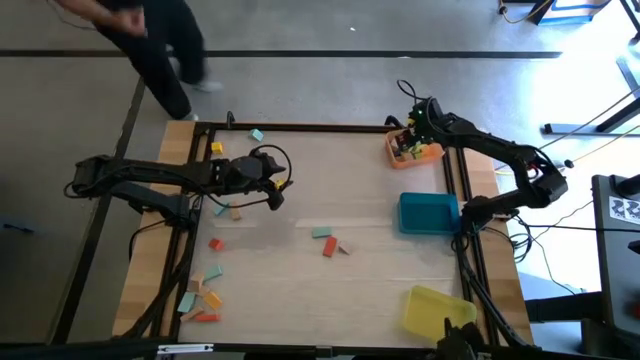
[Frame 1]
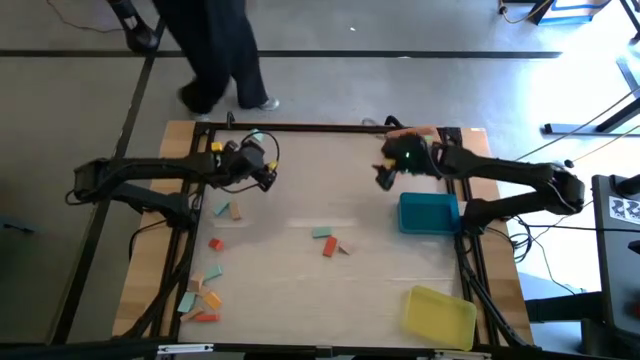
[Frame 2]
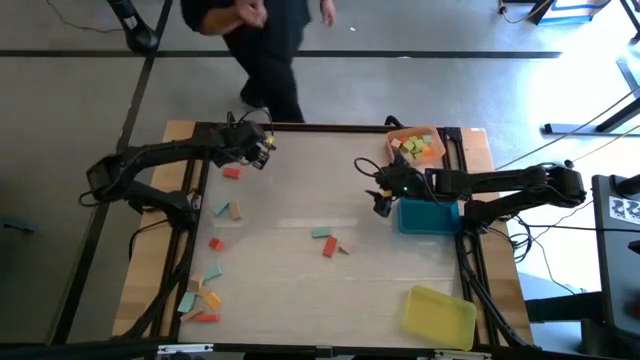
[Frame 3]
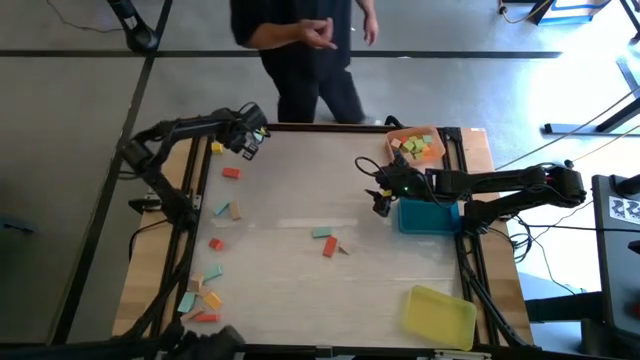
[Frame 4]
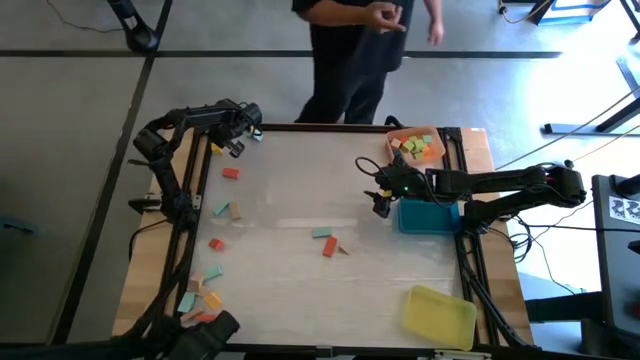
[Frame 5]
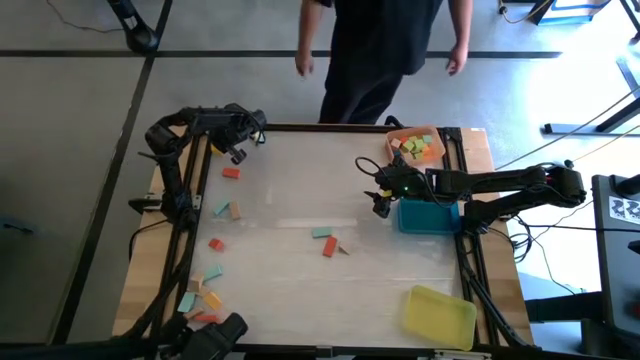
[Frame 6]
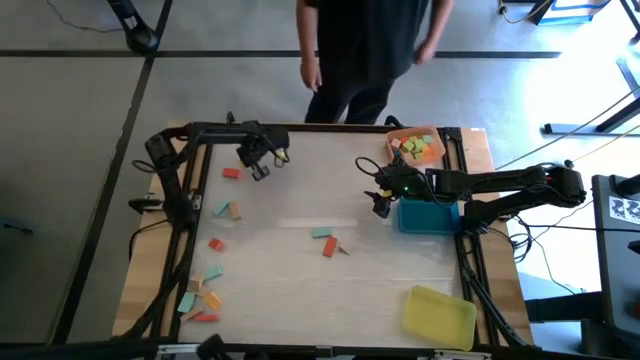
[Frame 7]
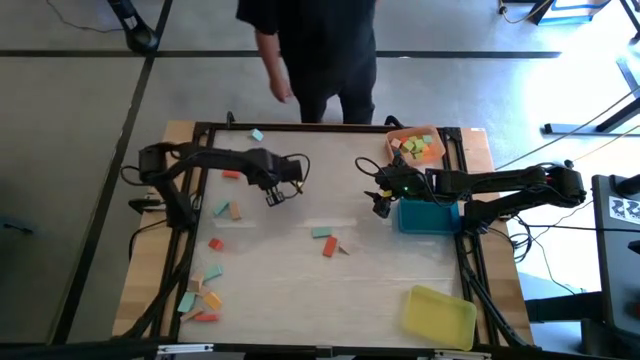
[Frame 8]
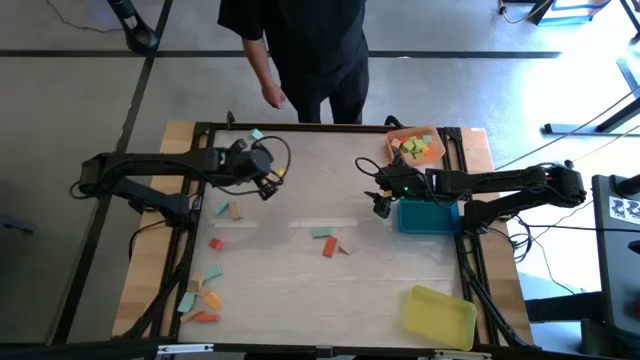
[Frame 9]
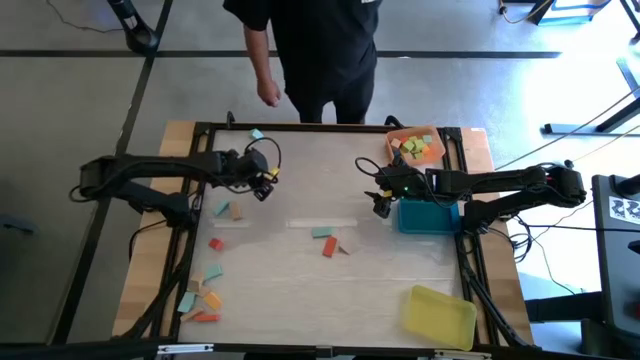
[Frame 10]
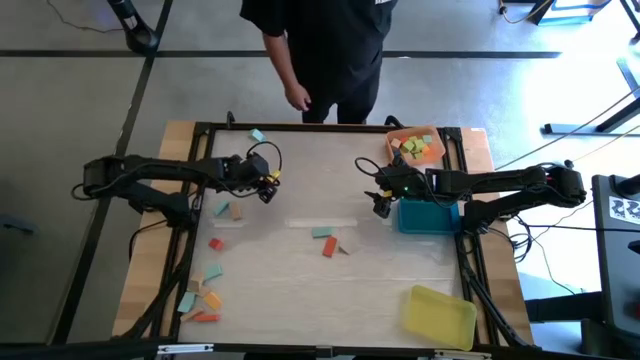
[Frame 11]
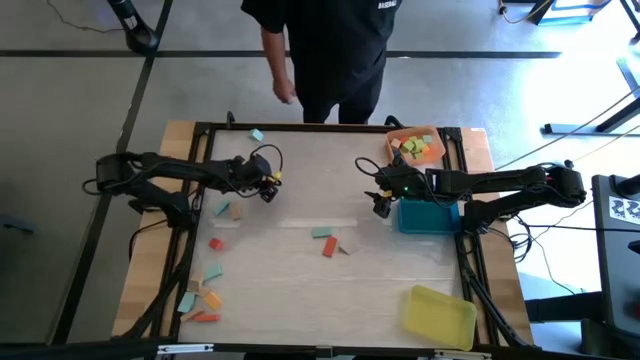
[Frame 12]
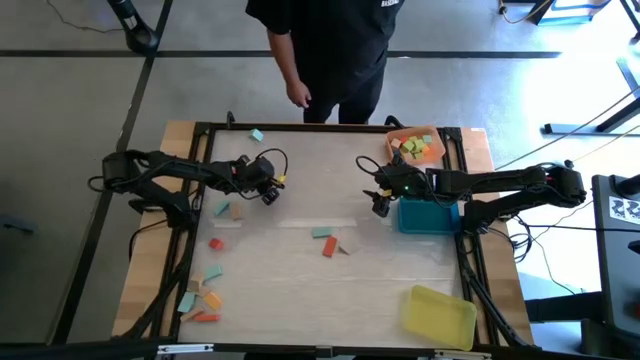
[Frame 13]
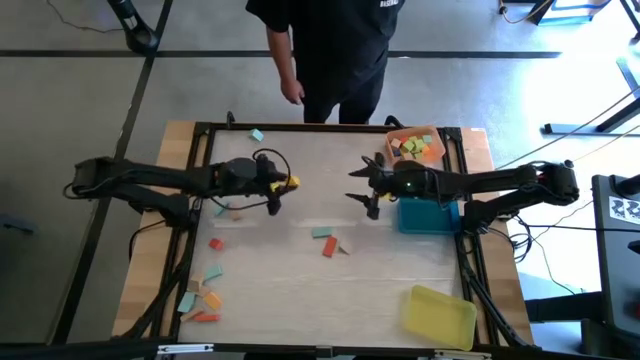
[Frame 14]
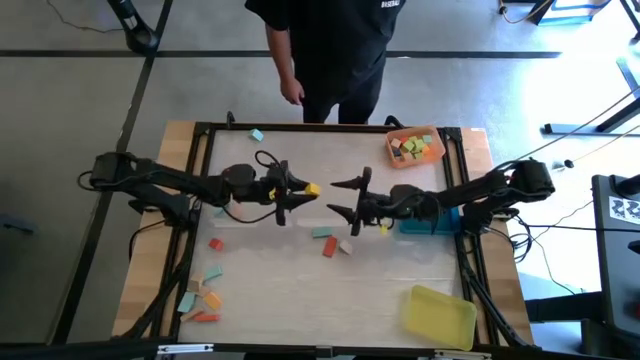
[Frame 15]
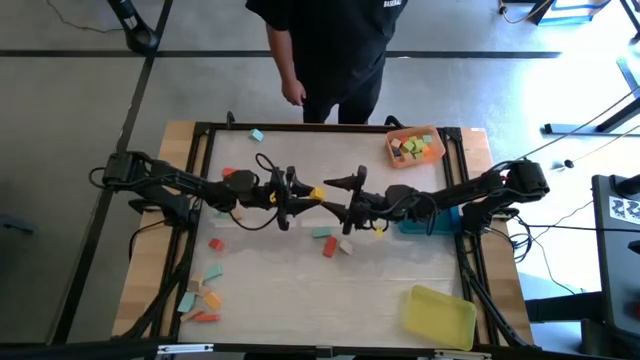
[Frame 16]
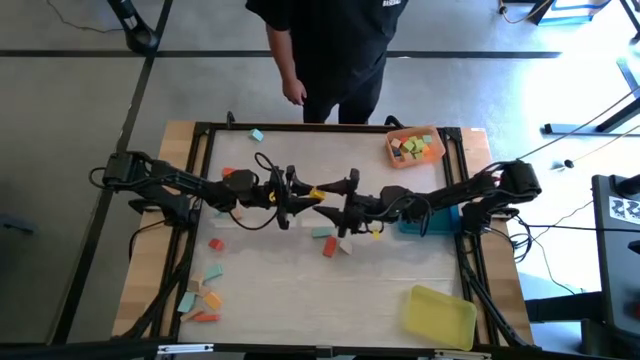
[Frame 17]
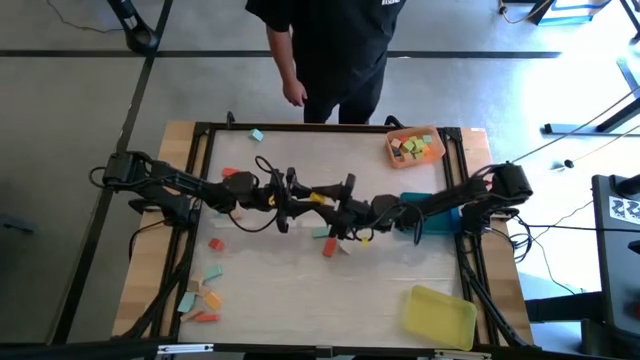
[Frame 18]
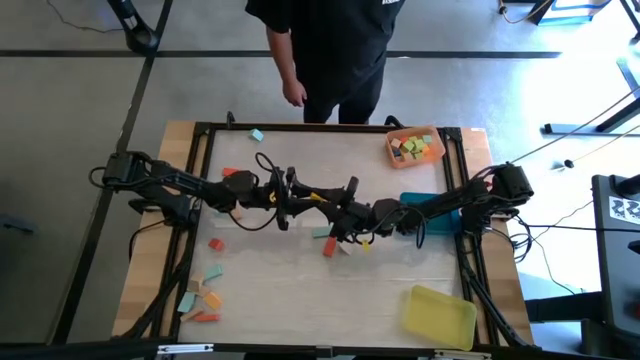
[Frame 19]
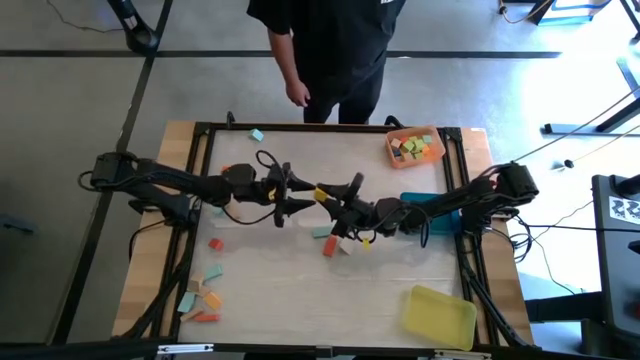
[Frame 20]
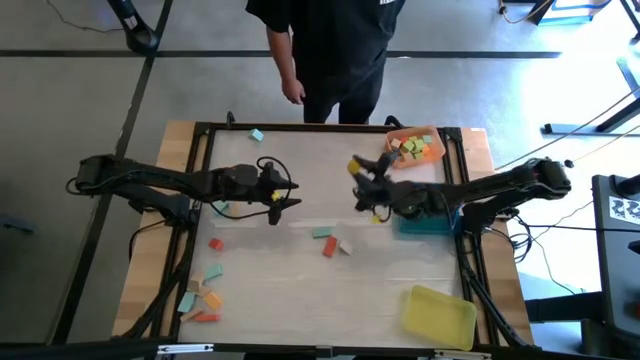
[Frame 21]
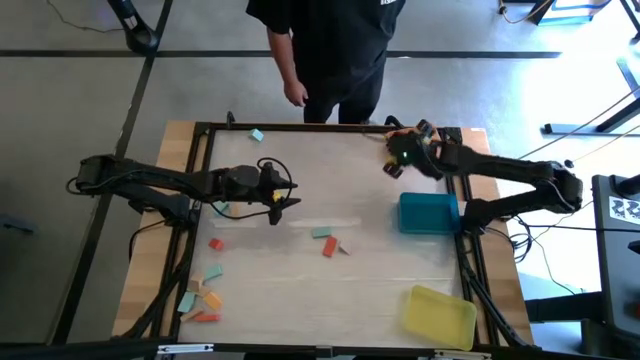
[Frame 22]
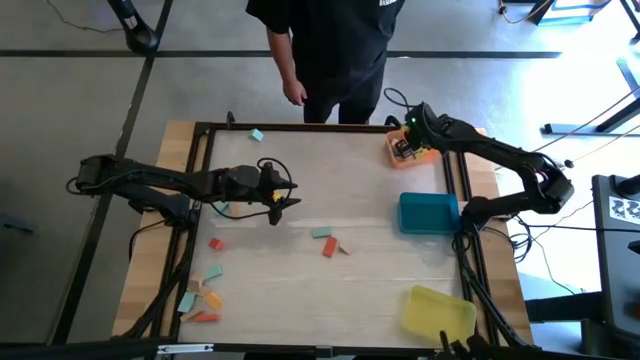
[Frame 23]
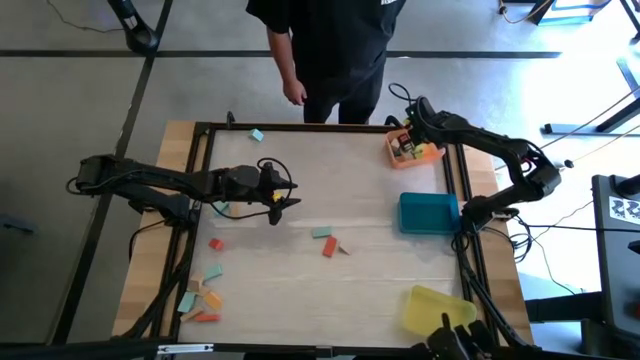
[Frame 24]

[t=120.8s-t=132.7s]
Task: Sort blocks by size
Put the yellow cube block into the orange bin

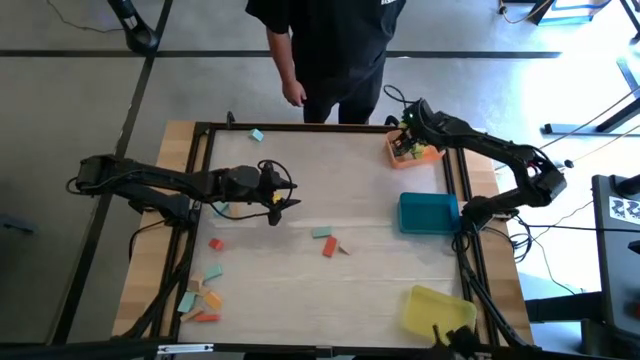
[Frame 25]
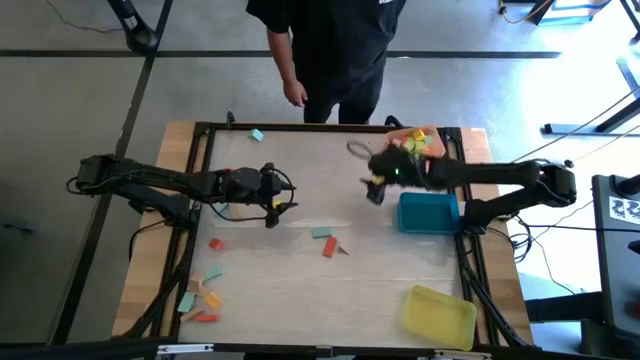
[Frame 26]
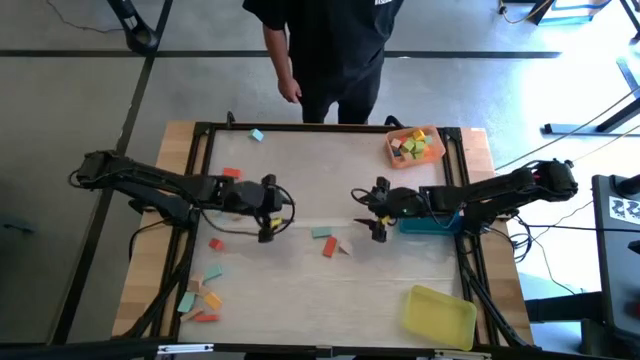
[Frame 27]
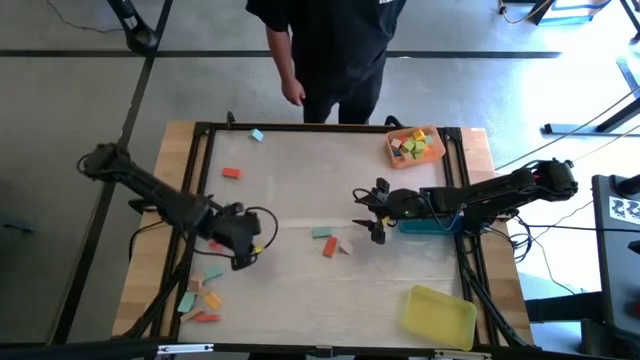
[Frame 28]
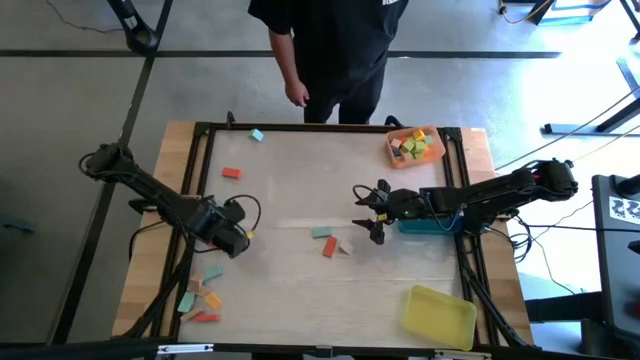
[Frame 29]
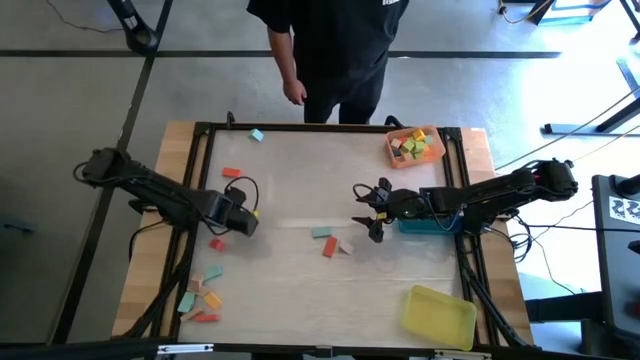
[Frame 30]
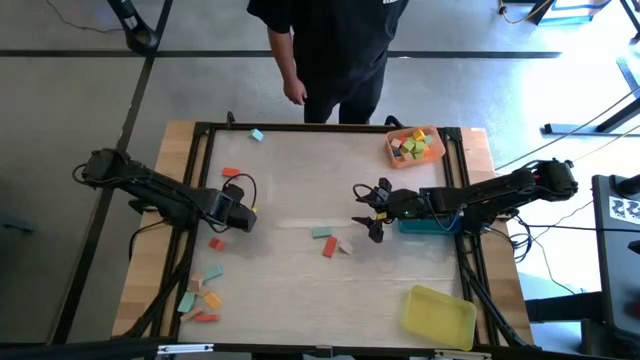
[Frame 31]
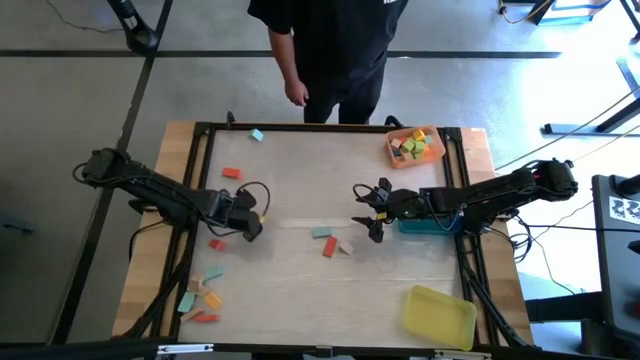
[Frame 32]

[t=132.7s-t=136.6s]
Put the brown rectangular block into the blue bin

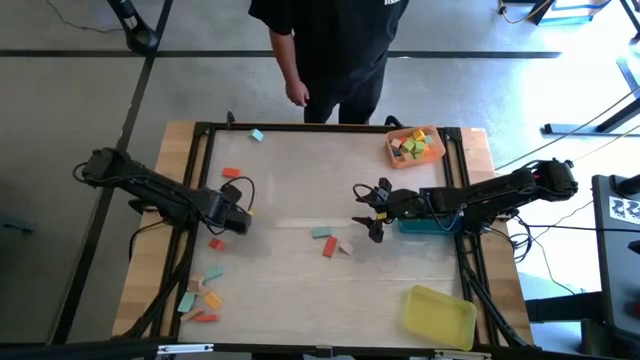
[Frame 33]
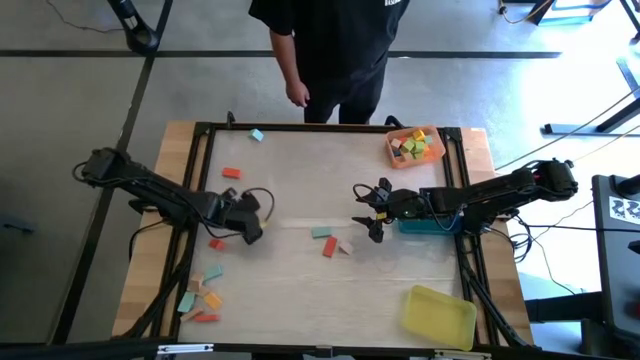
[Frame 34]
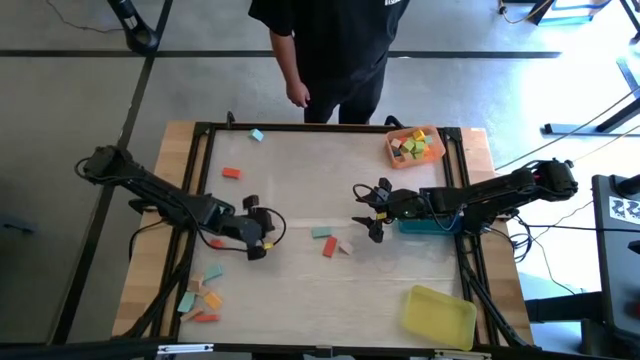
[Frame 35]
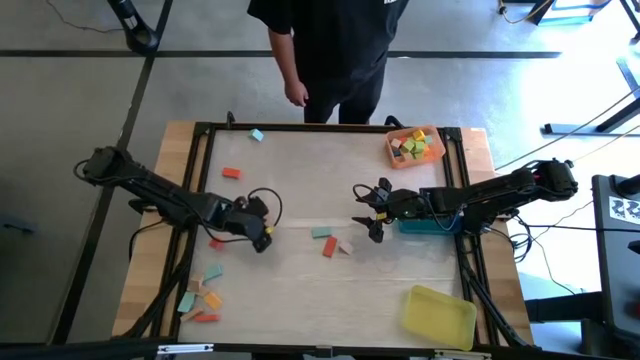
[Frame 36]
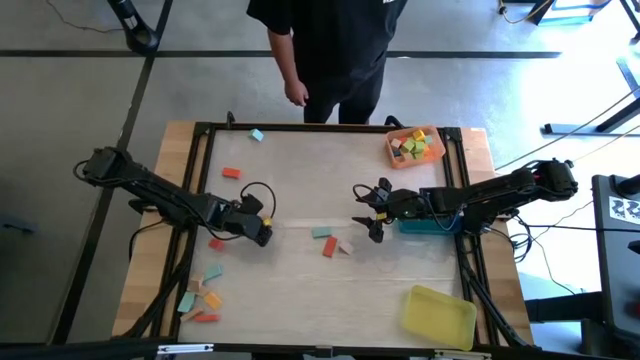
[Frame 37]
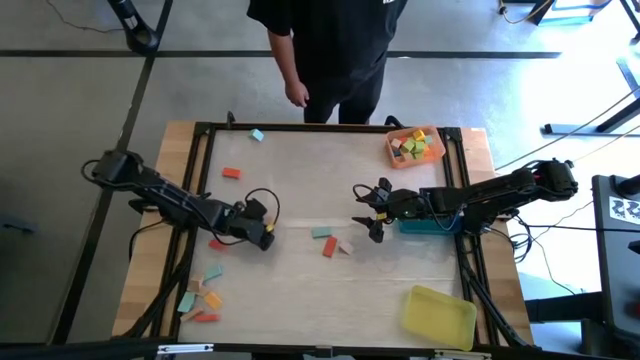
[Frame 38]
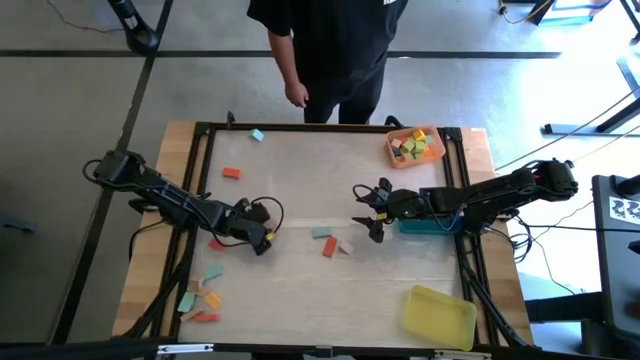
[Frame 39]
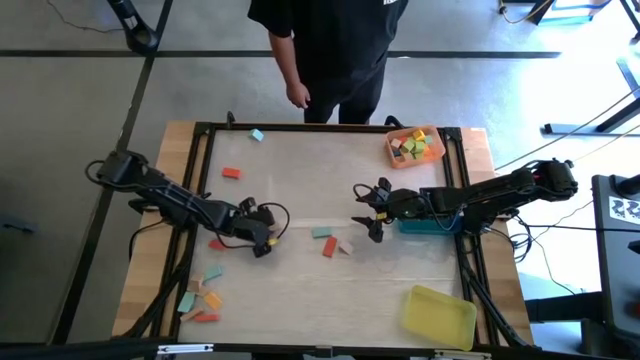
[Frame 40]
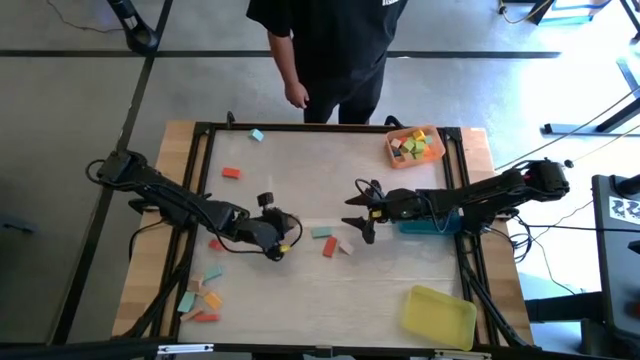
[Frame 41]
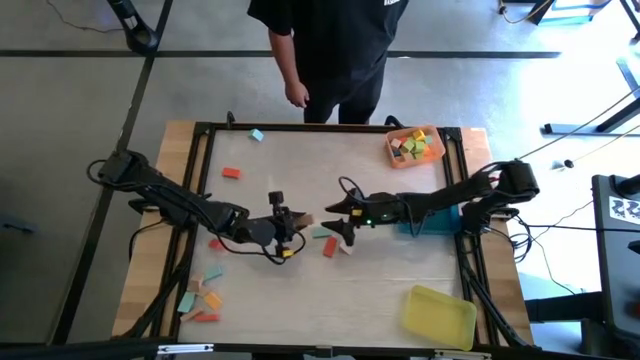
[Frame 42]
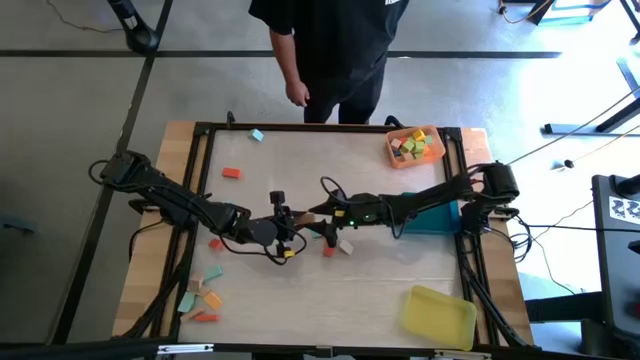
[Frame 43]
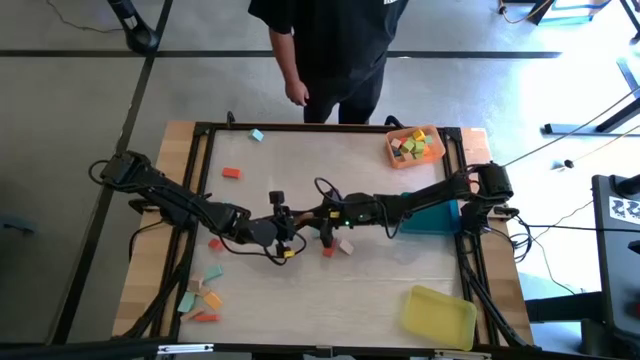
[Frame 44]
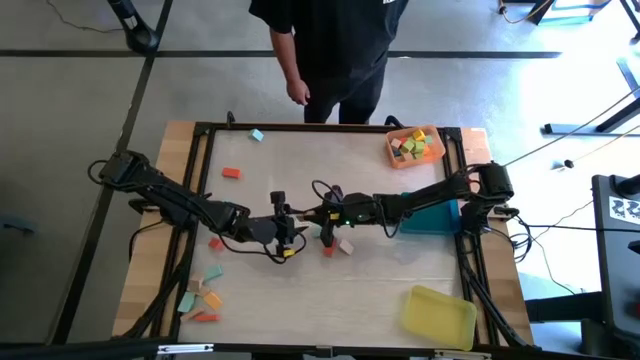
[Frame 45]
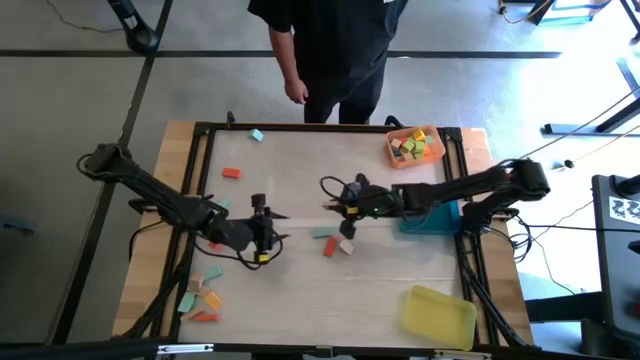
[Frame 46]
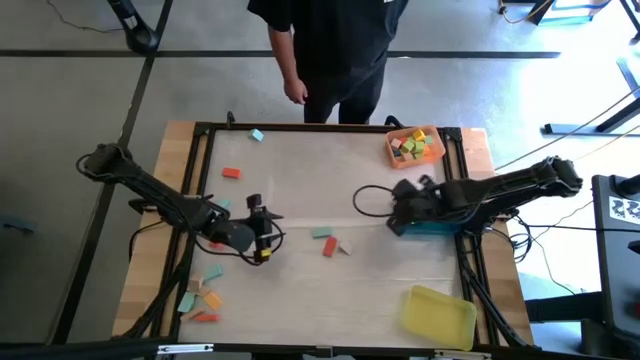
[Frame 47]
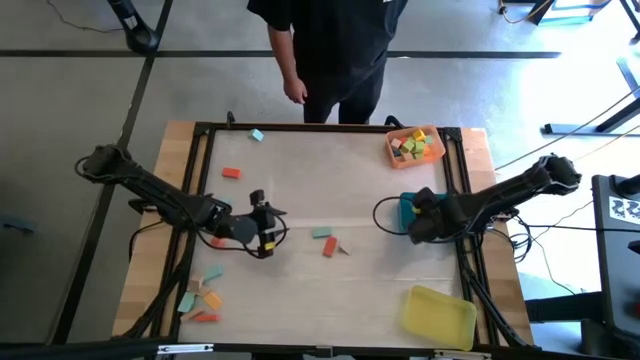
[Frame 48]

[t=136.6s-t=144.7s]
Put the brown rectangular block into the blue bin
